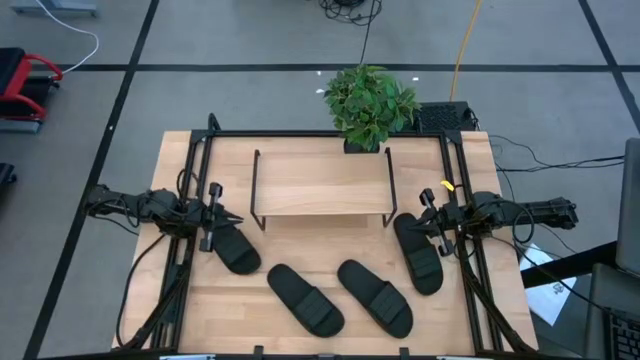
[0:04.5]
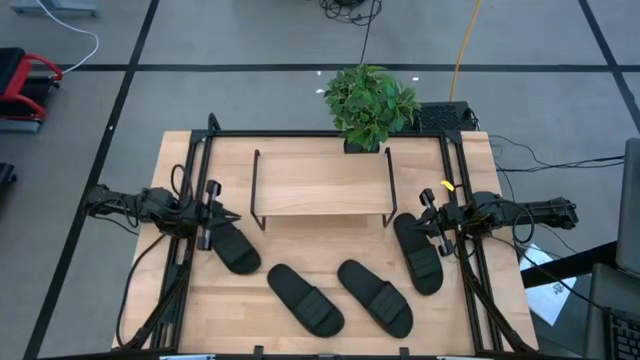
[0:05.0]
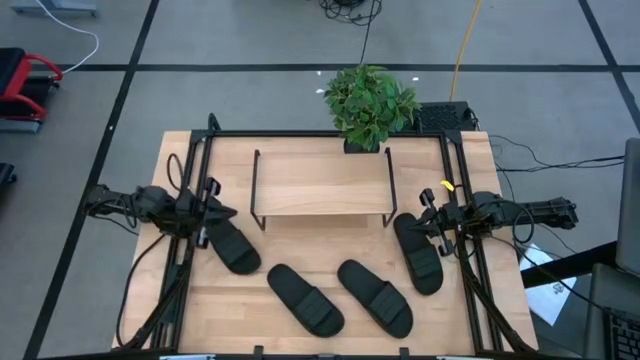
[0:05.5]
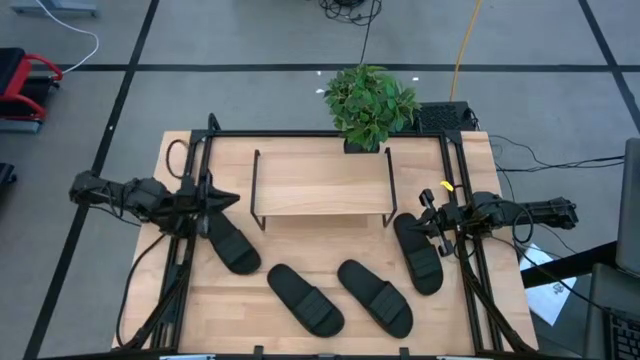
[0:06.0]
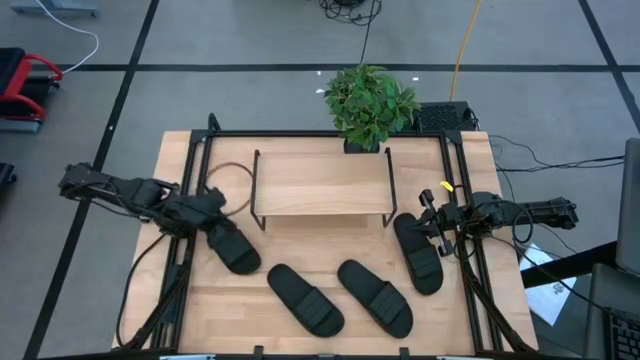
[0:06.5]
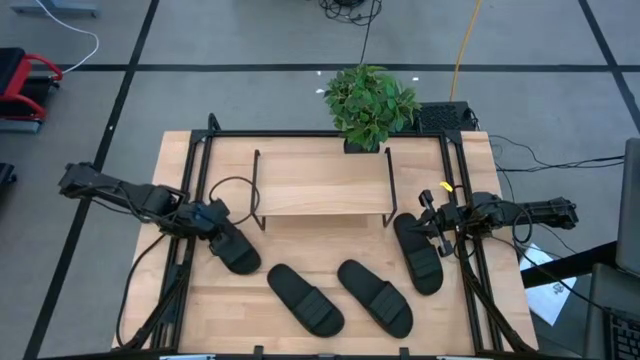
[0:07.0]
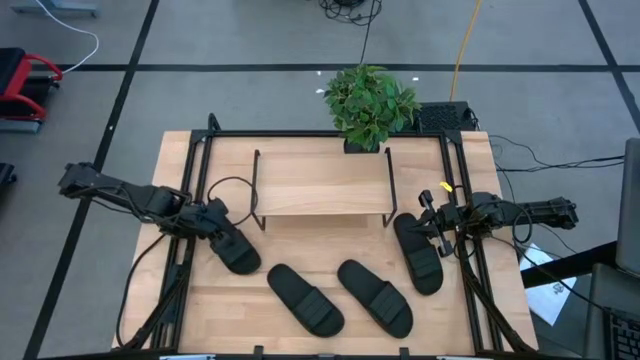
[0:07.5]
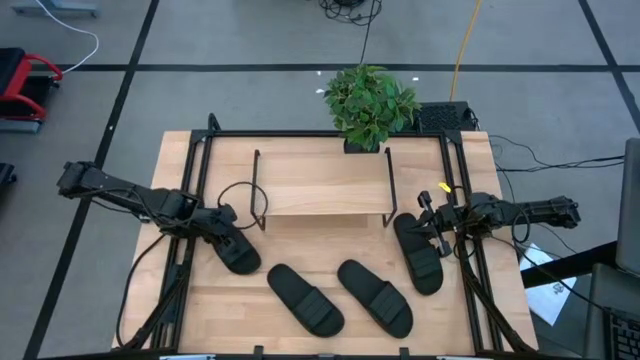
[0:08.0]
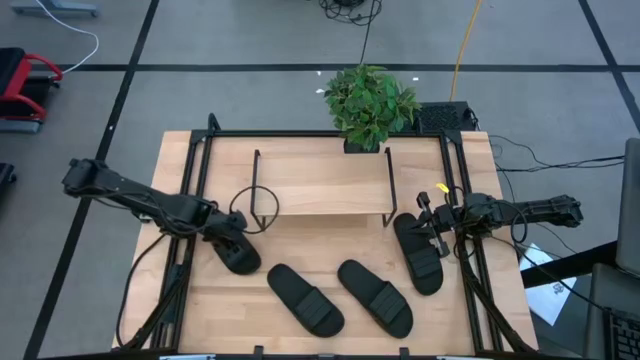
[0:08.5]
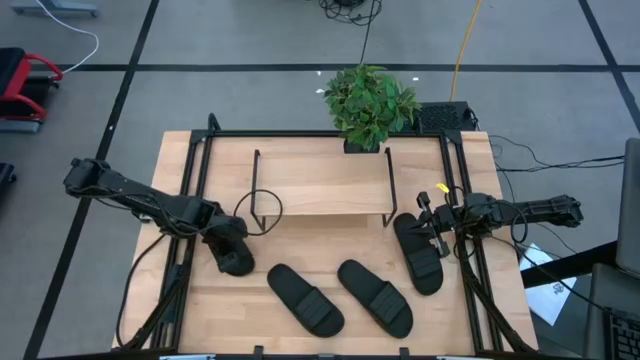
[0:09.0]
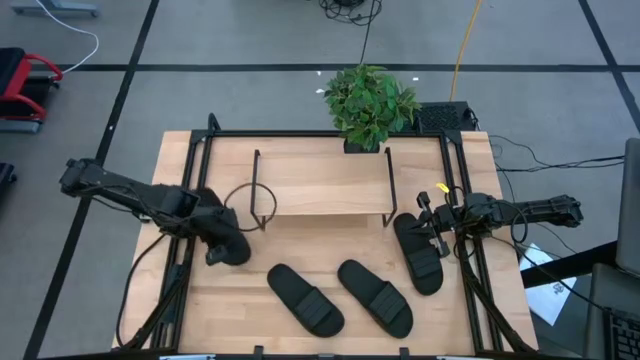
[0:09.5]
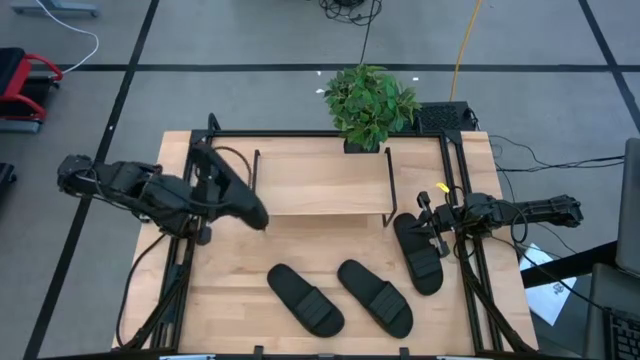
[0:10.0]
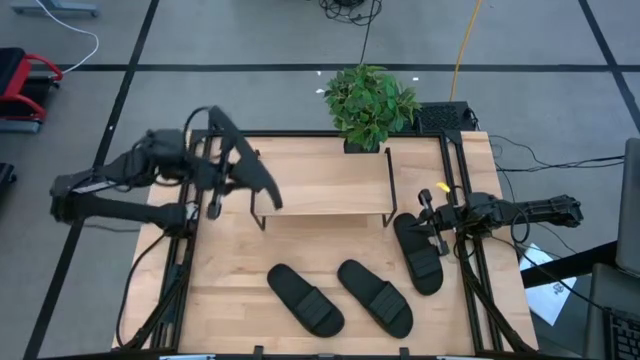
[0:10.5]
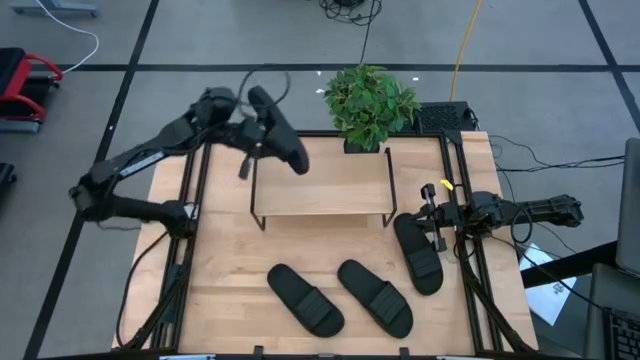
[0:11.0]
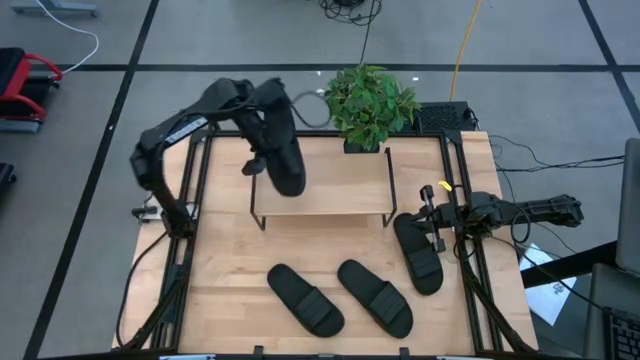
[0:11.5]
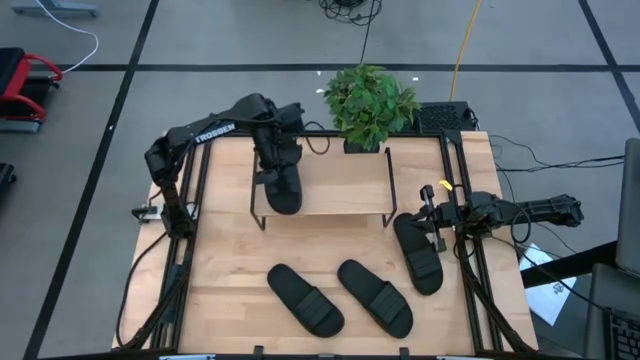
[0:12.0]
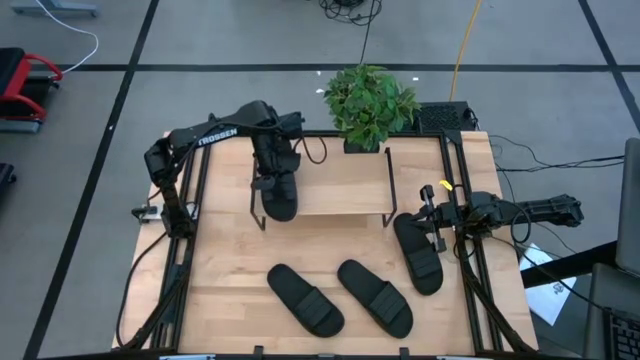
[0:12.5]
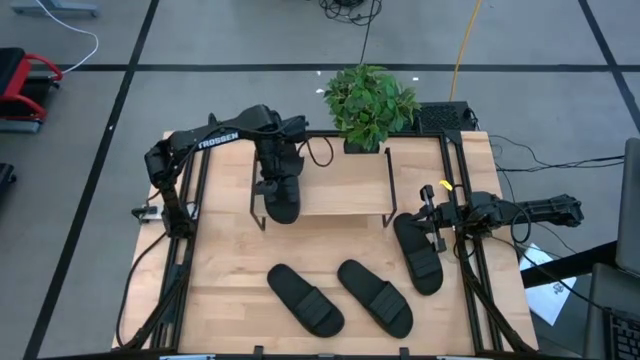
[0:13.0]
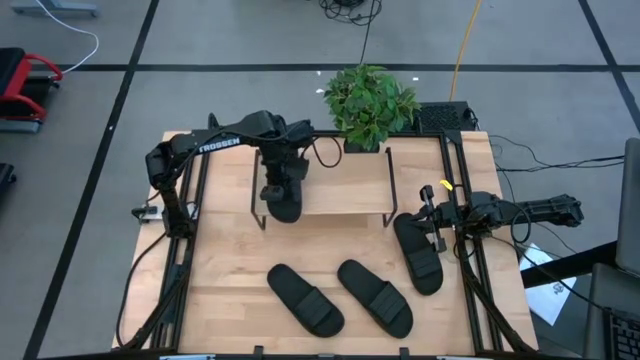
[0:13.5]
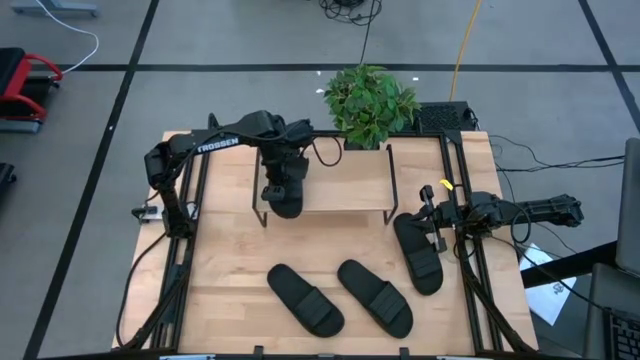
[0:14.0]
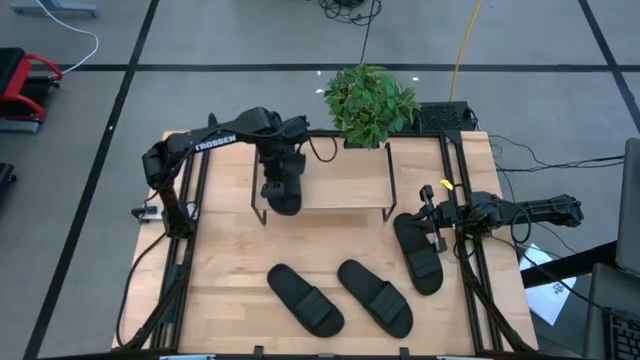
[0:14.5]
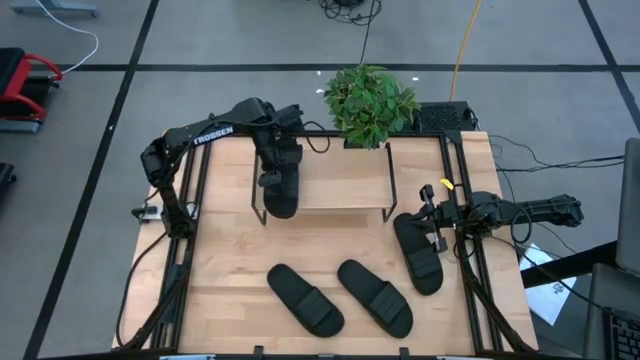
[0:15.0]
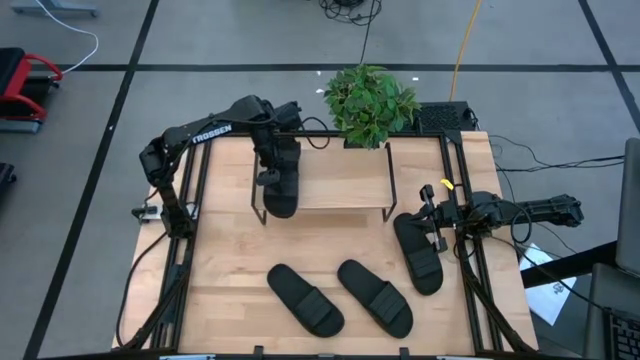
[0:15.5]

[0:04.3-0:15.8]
Task: Pick and place slides into the shelf
Put the black slide on the shelf

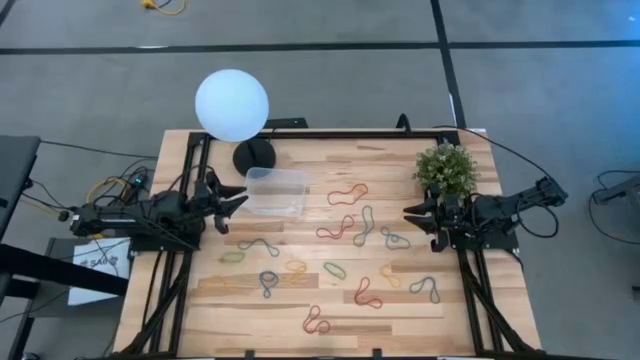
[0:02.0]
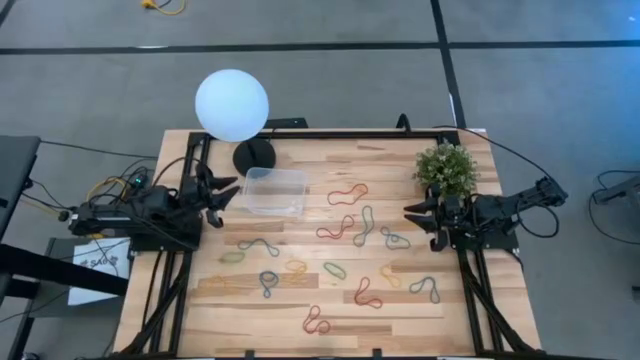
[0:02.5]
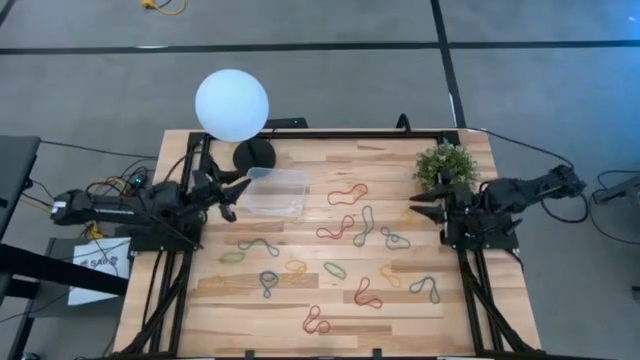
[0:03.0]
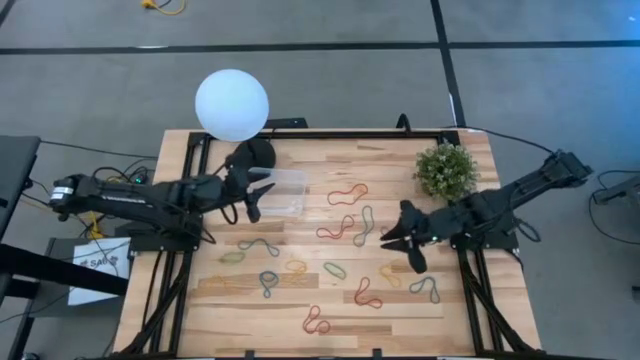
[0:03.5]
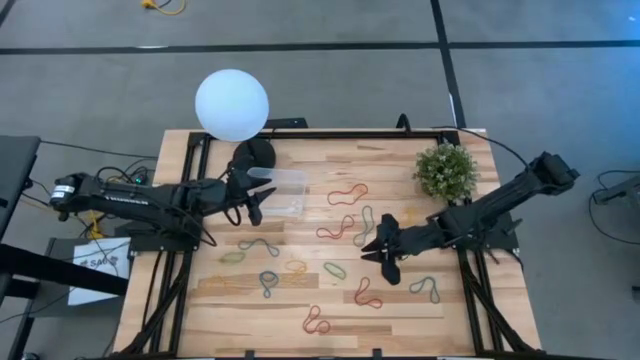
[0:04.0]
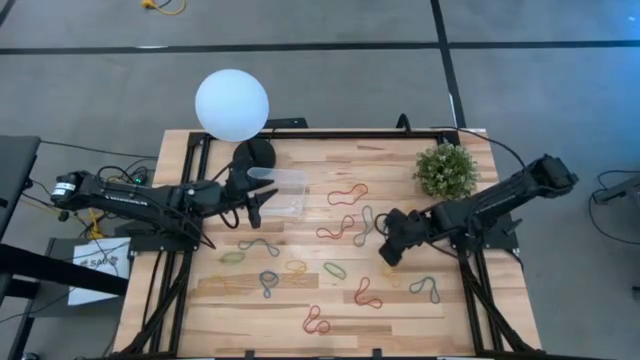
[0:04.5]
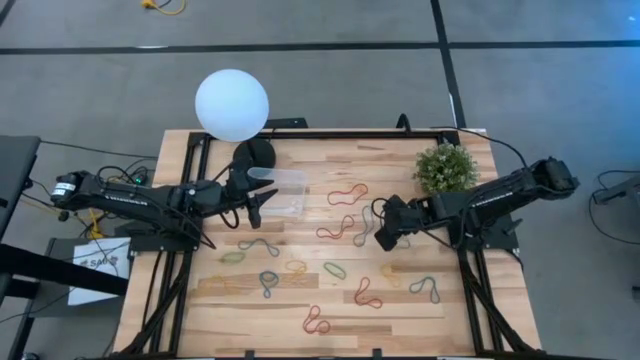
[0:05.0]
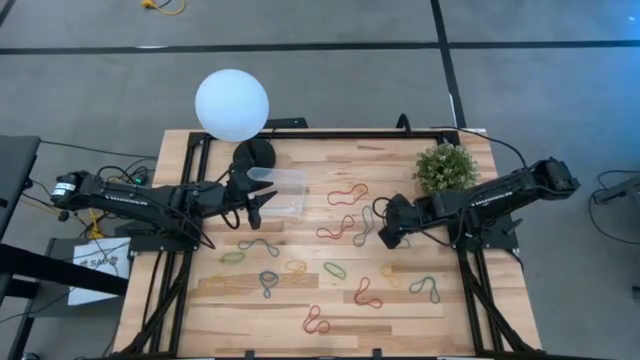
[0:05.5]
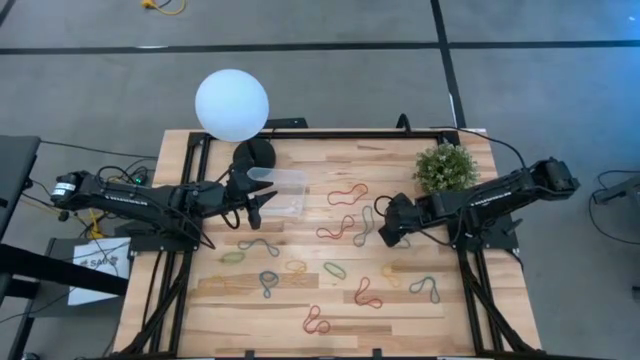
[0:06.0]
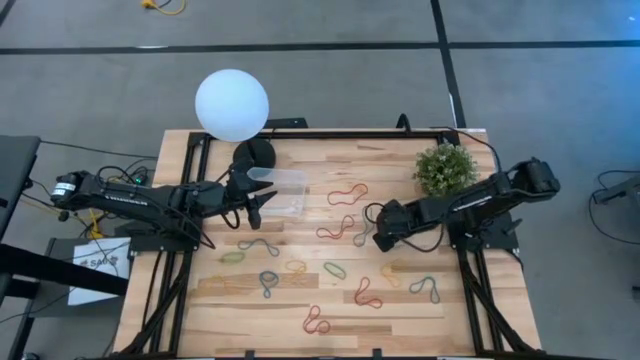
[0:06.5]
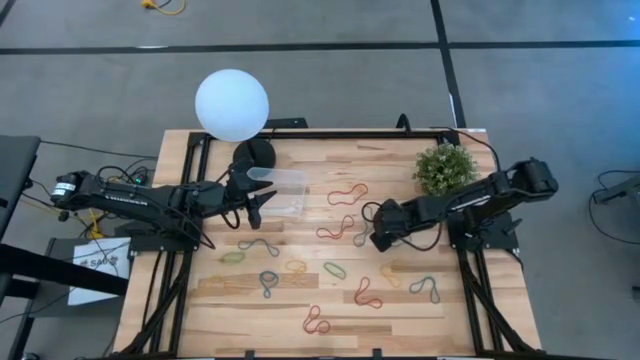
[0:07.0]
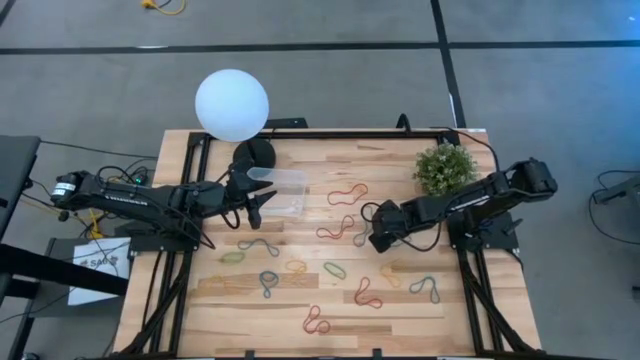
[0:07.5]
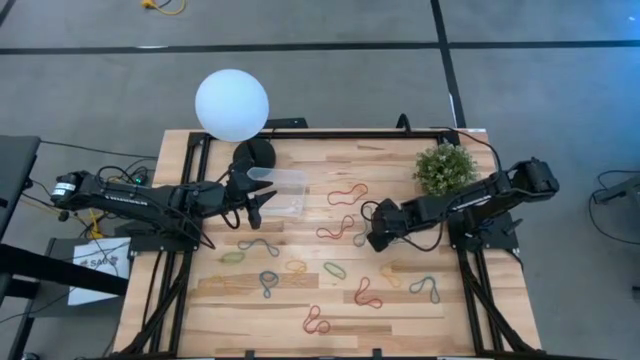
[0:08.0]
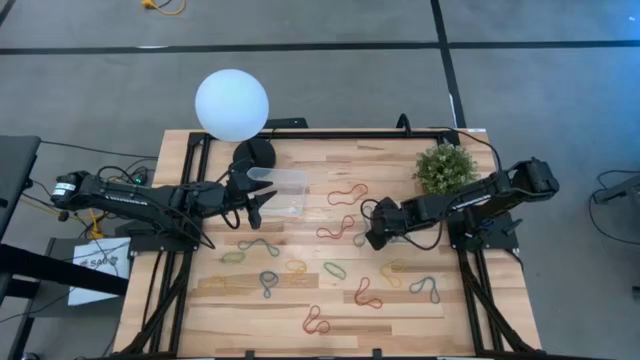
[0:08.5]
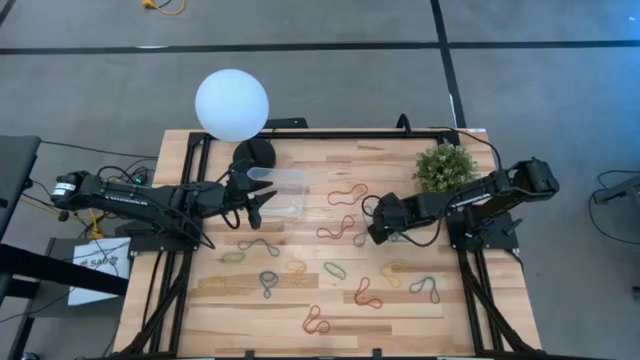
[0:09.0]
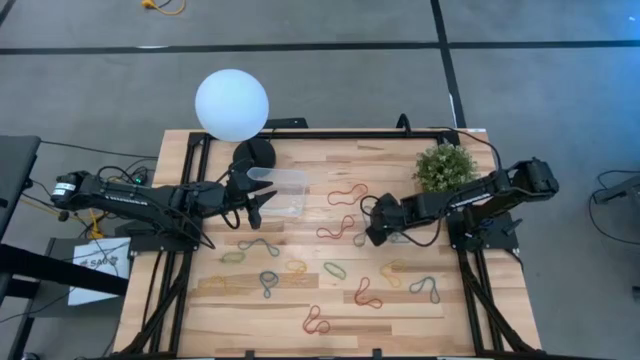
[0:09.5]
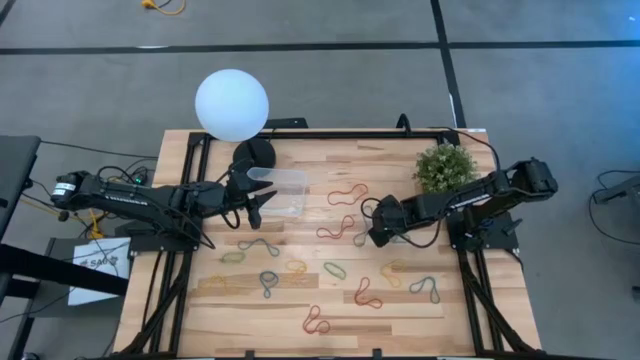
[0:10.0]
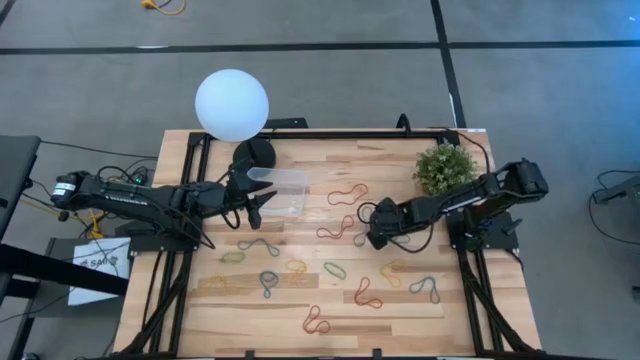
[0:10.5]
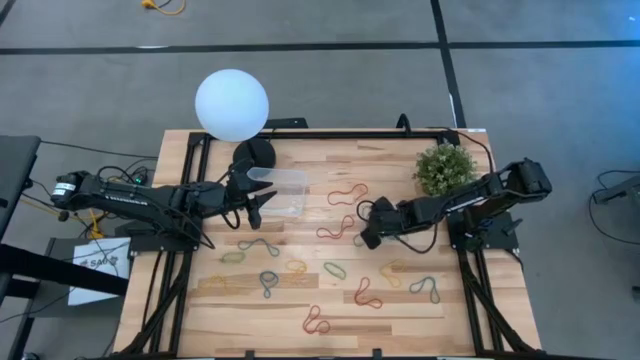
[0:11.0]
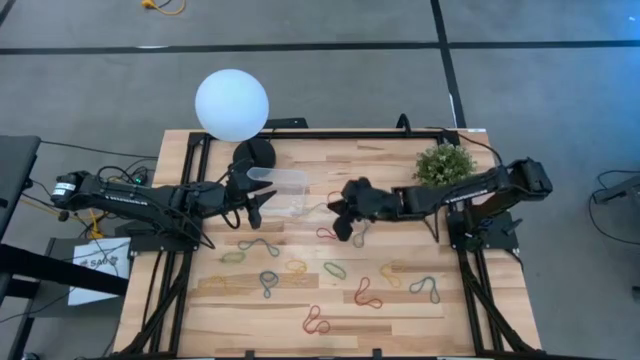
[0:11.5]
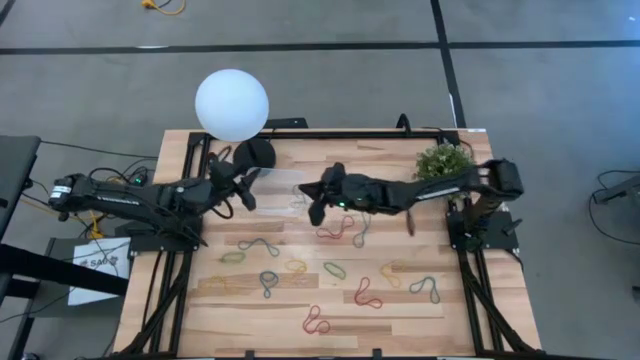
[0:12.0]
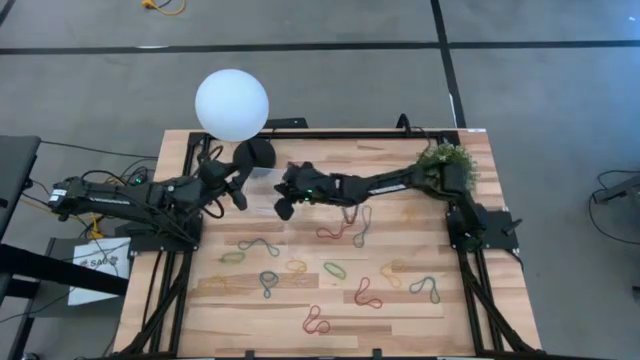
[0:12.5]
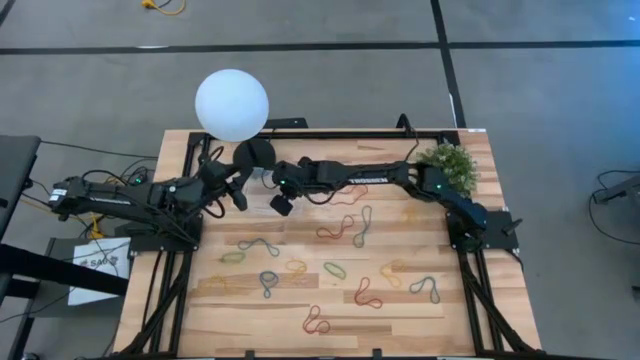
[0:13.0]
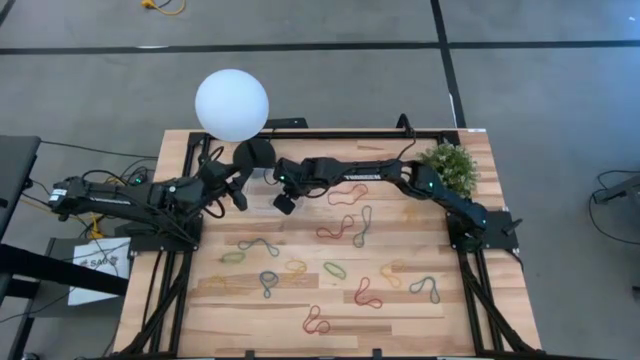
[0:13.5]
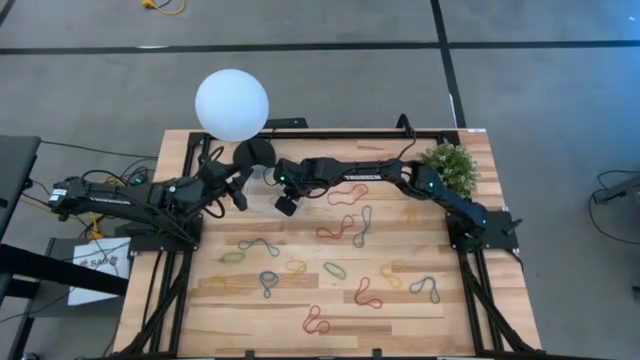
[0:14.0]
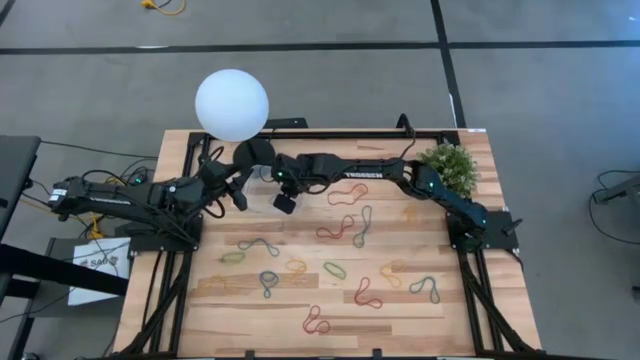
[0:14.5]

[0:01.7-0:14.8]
Task: Pick and place rubber bands into bin
Put the blue rubber band into the transparent container
